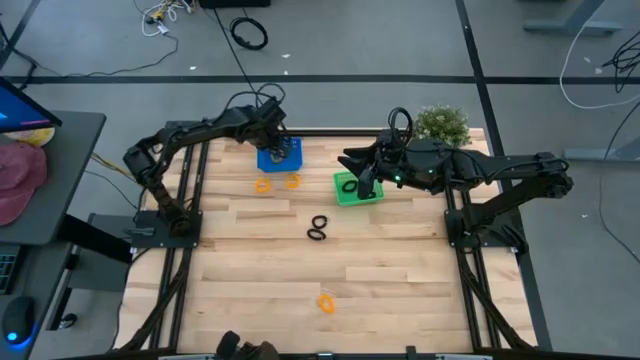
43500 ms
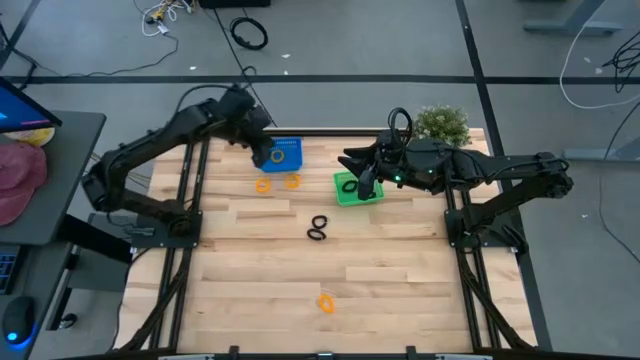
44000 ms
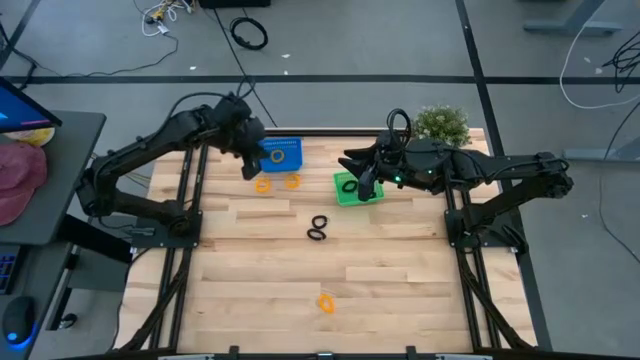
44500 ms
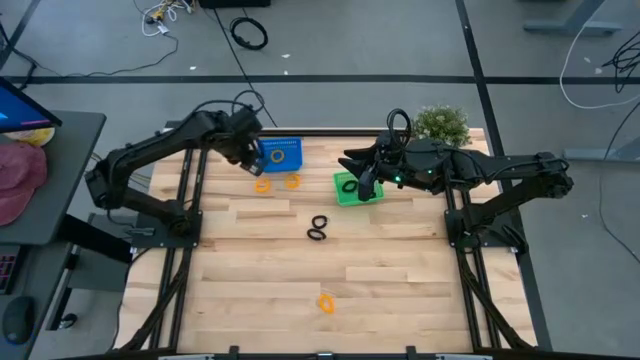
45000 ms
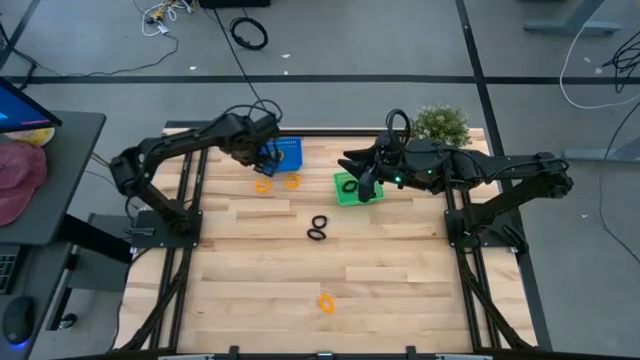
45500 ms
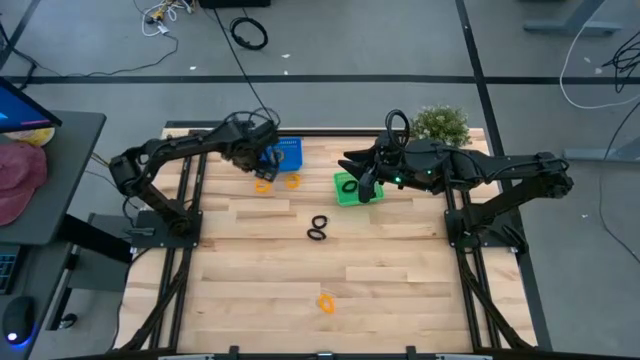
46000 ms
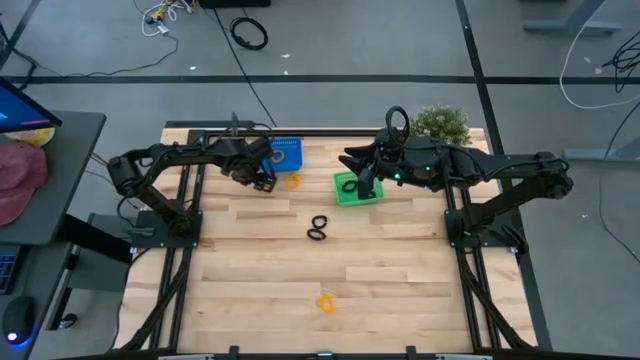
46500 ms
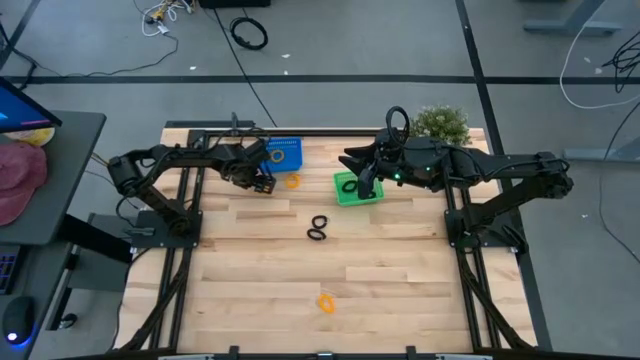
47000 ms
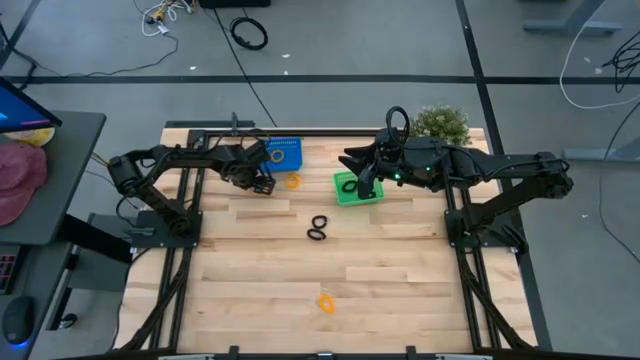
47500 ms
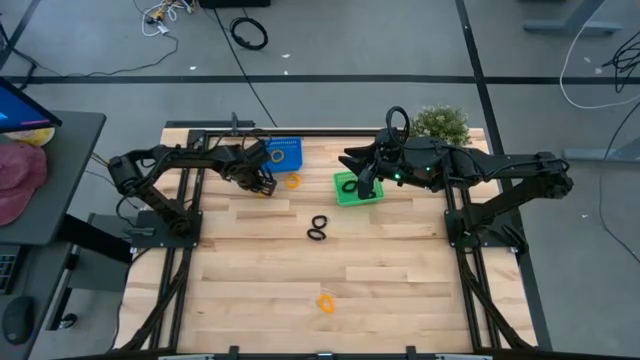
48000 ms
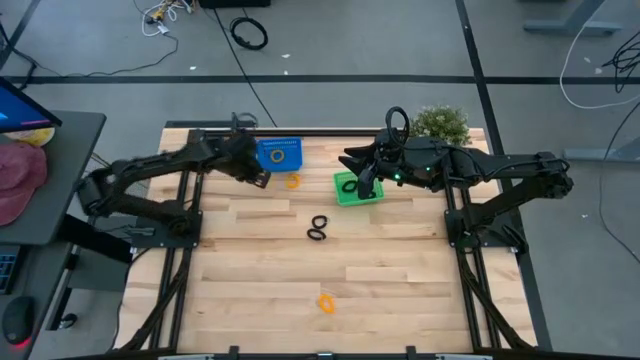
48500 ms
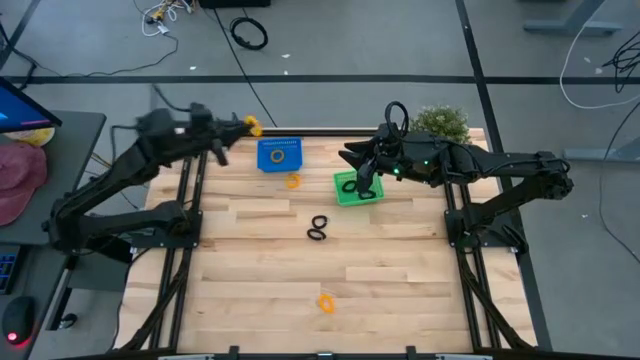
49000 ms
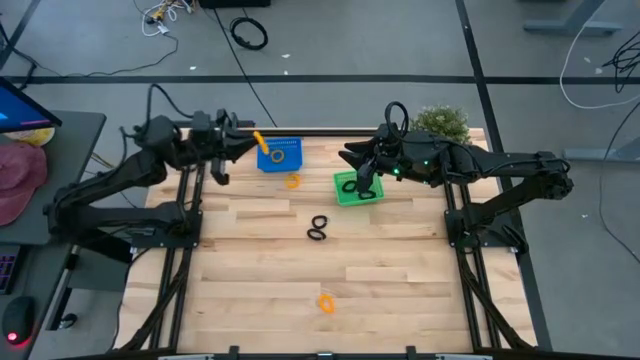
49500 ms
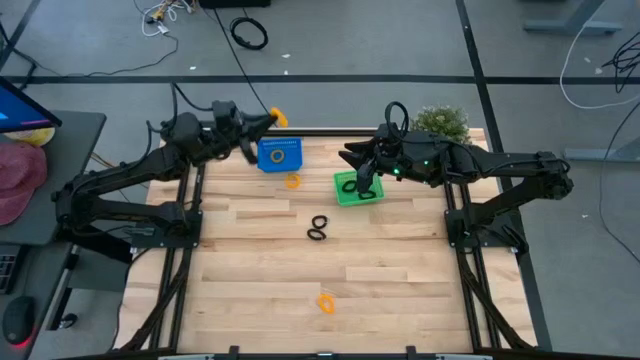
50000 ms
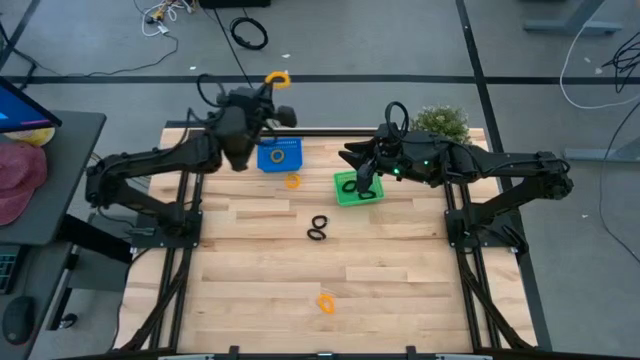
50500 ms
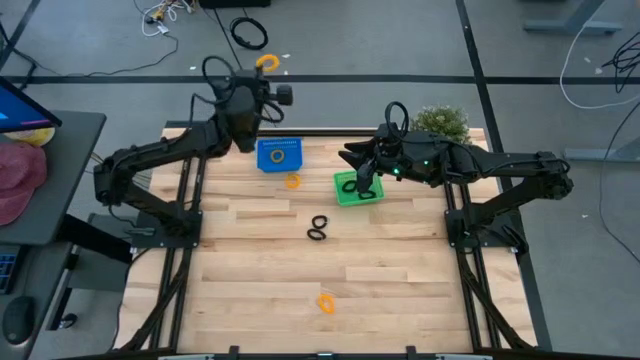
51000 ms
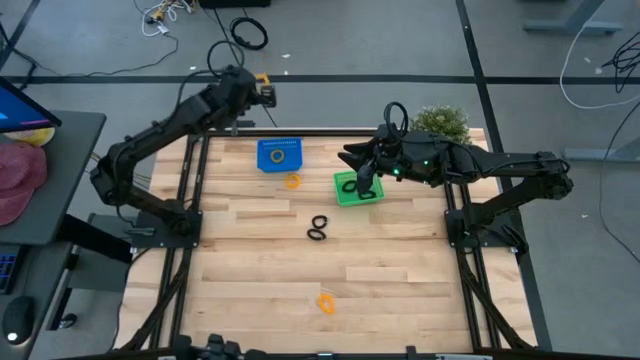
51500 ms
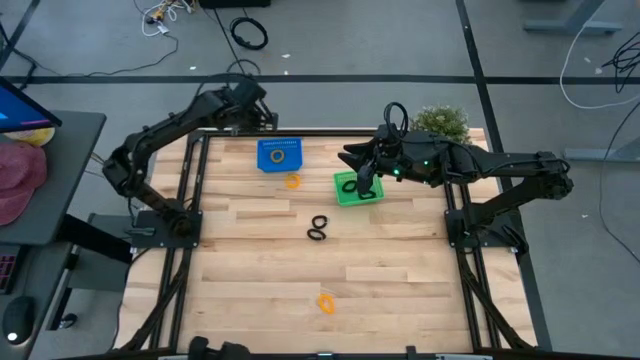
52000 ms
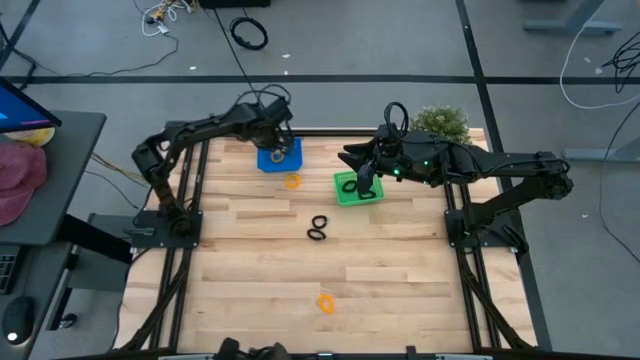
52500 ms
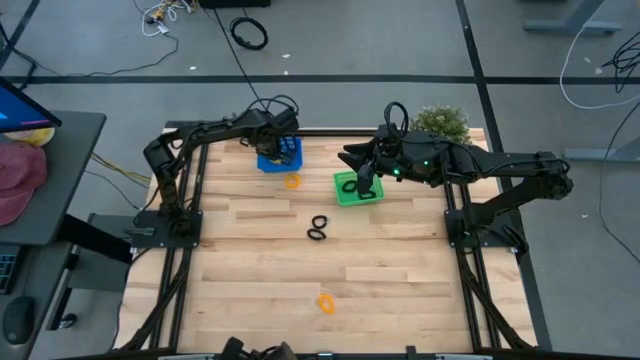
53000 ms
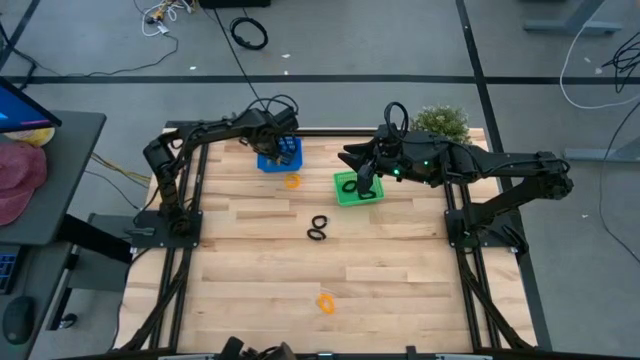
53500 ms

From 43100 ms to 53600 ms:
Task: Sort spring keychains
Put the yellow spring keychain into the blue bin

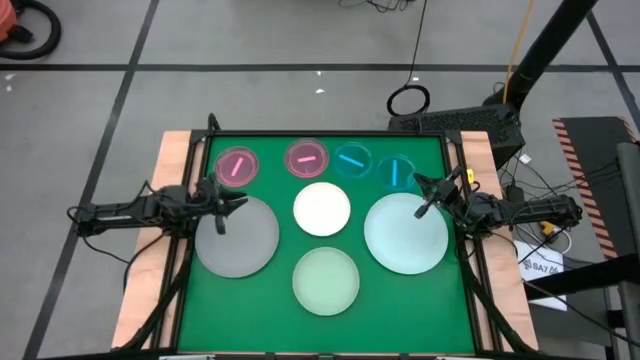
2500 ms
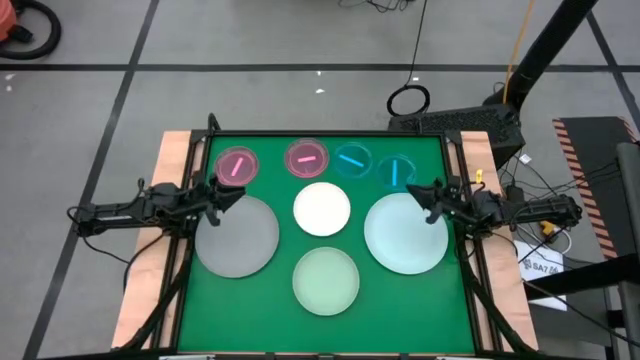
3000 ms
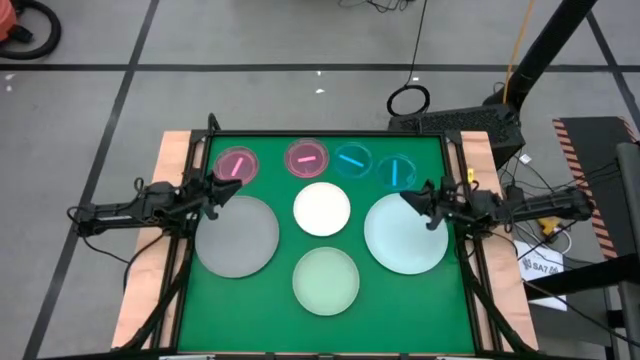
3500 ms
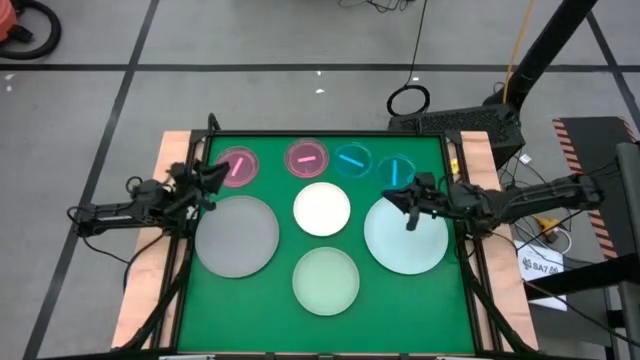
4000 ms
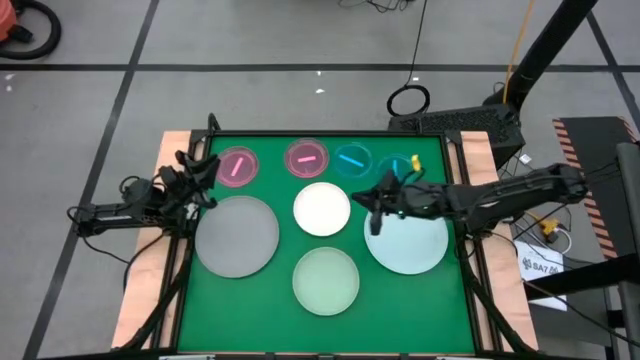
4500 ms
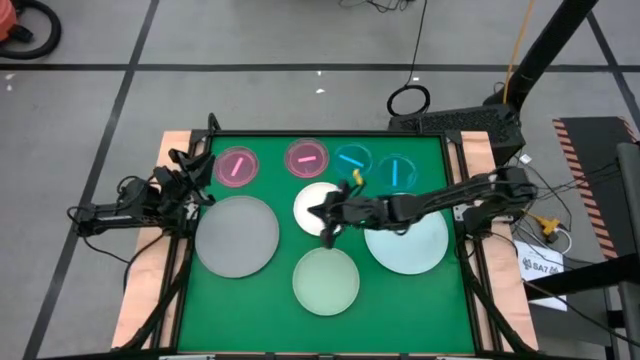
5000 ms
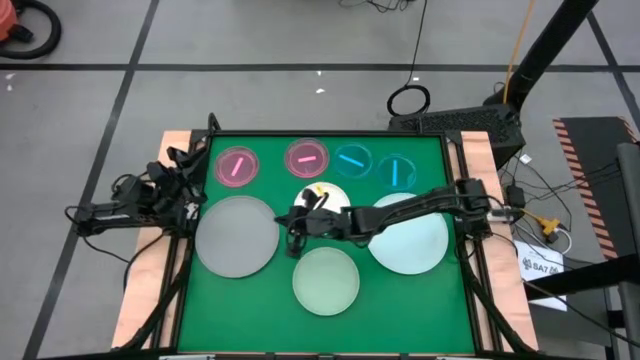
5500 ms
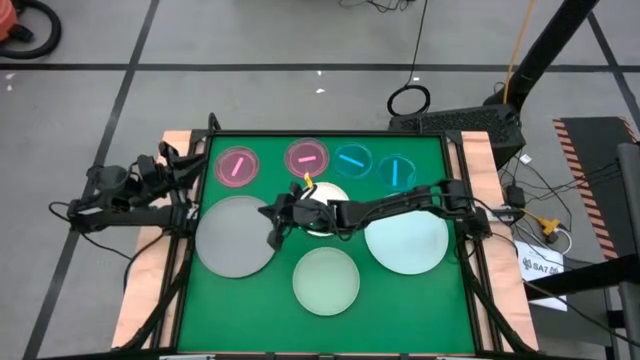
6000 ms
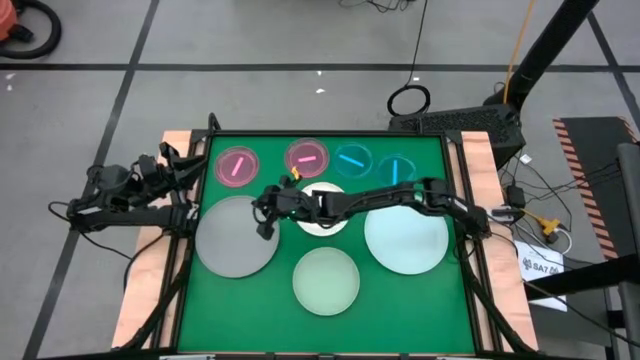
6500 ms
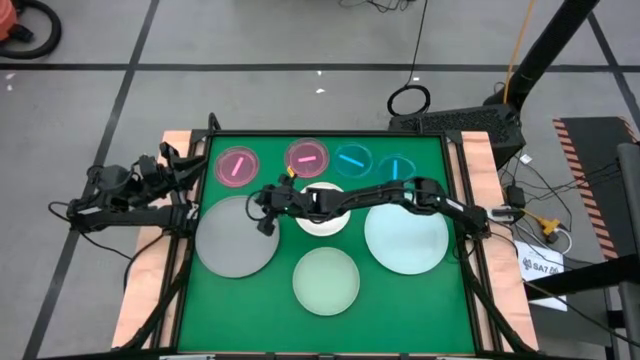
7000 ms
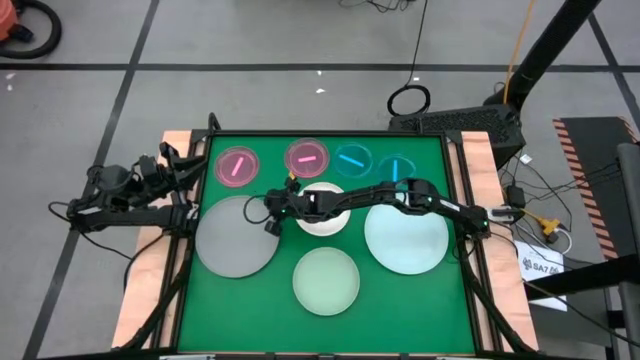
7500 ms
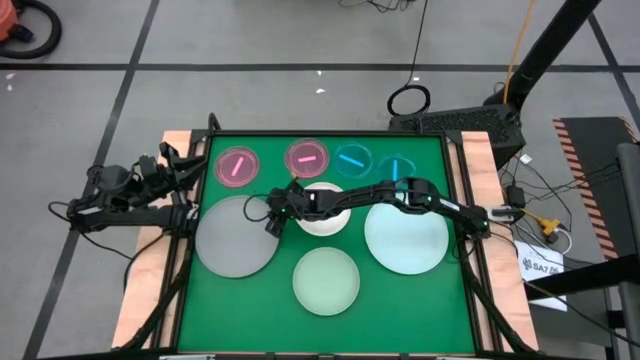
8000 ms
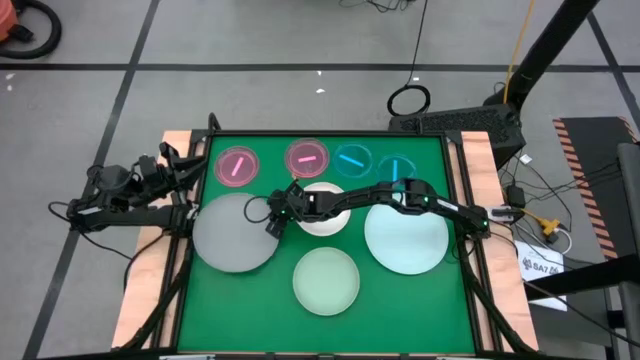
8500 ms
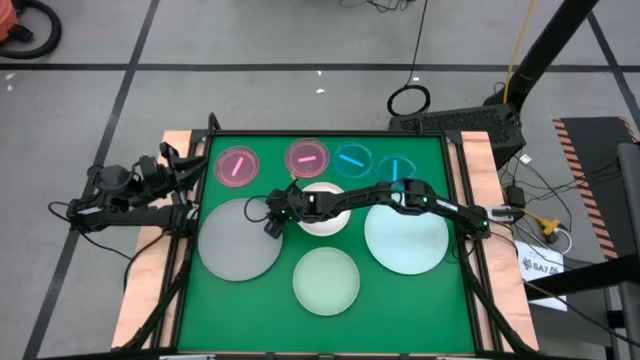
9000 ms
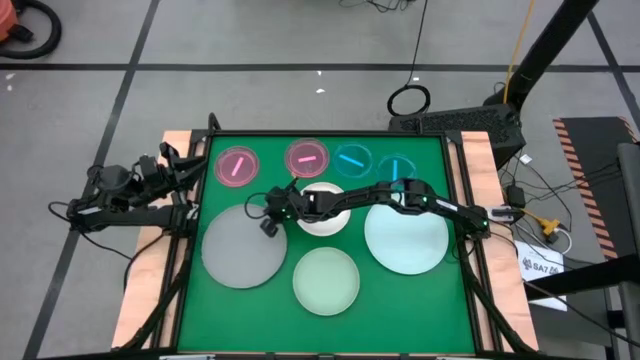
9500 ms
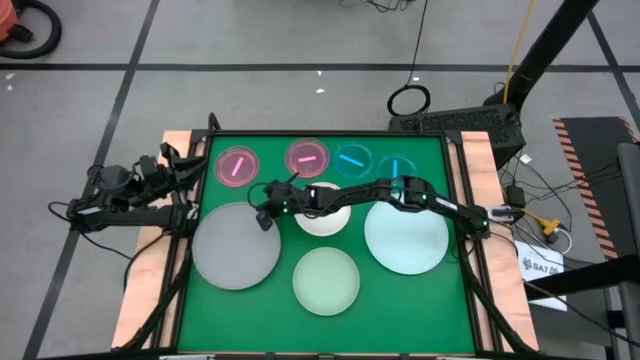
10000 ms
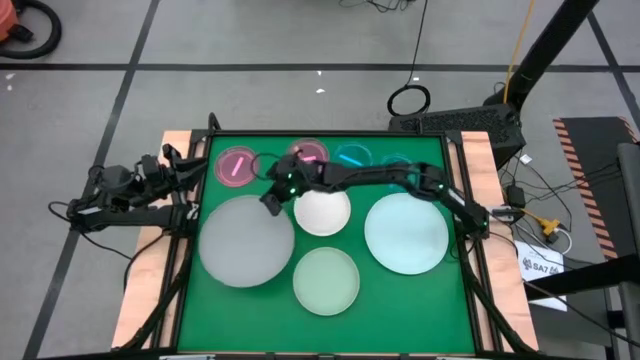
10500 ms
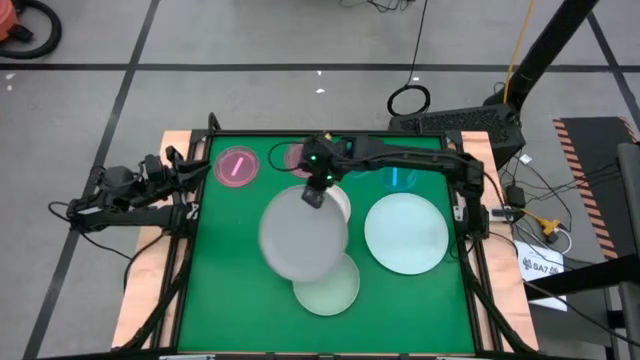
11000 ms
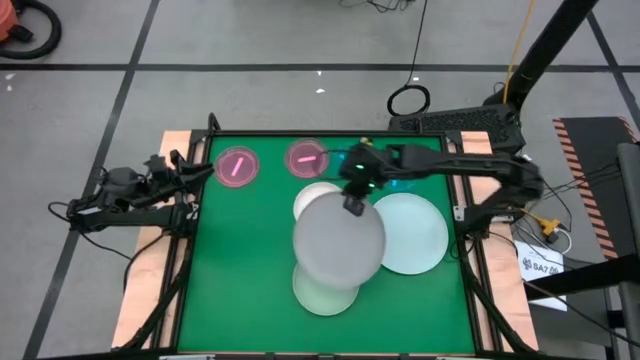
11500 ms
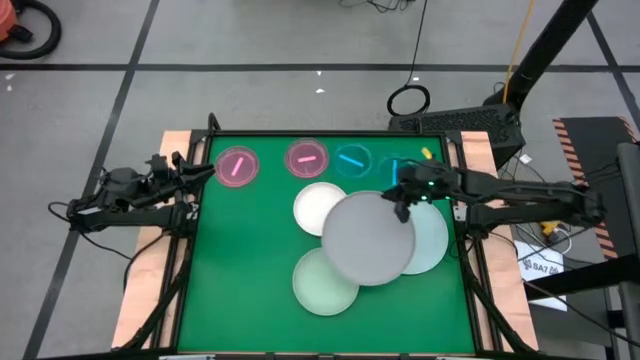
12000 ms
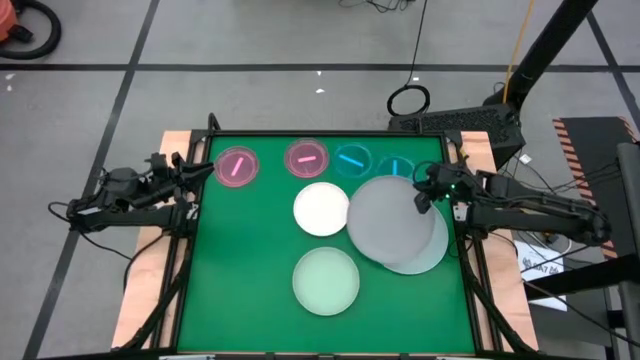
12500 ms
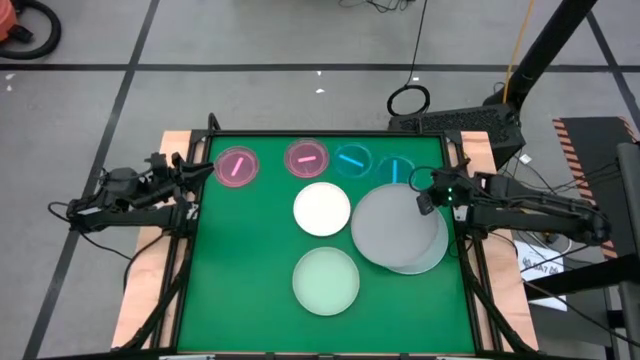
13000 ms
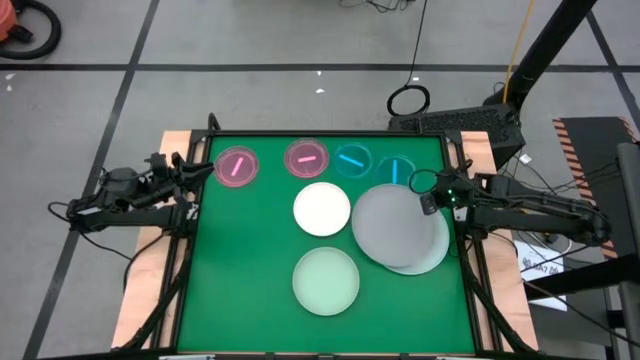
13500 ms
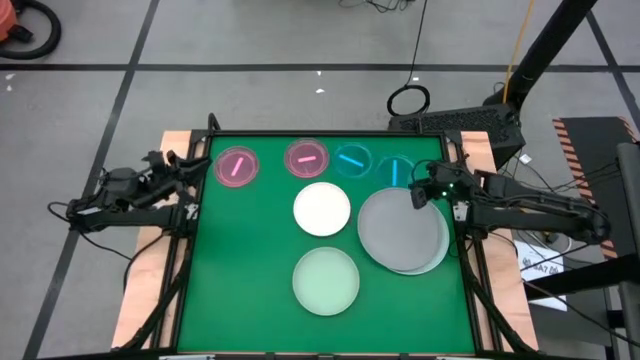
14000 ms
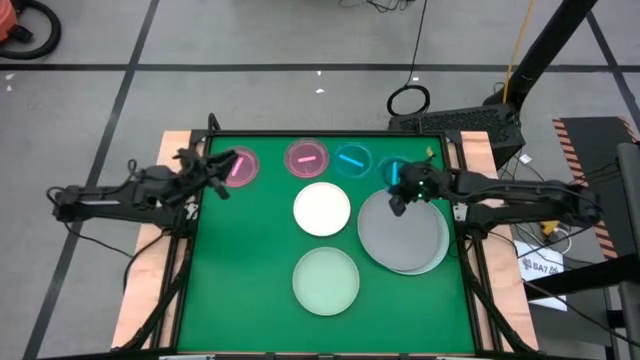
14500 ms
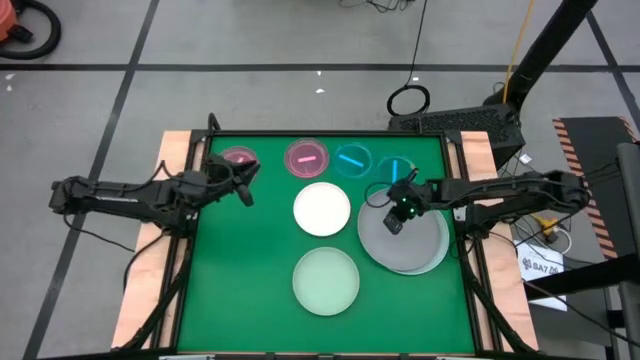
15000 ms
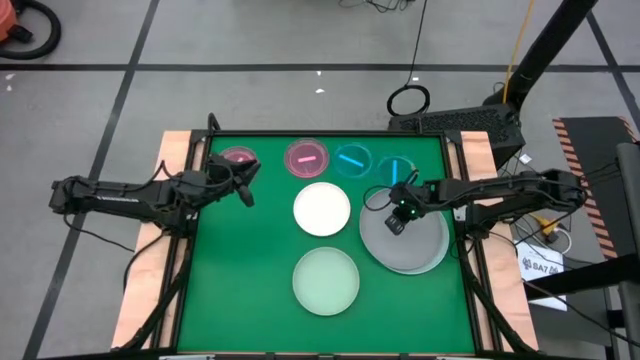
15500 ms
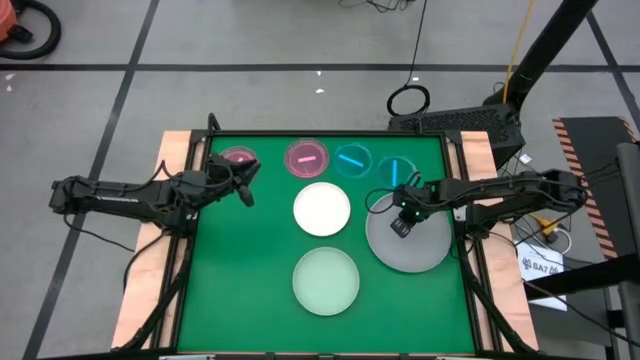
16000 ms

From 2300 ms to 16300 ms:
Task: Stack plastic plates
Stack the gray plate on top of the blue plate
